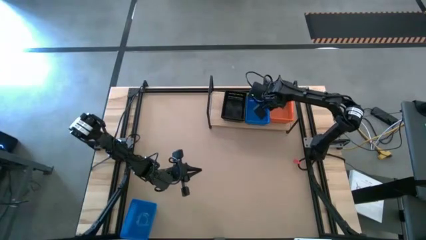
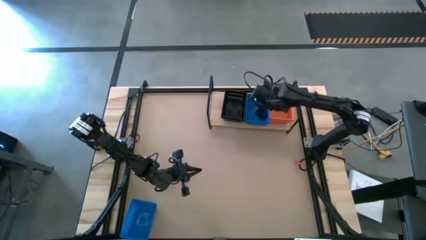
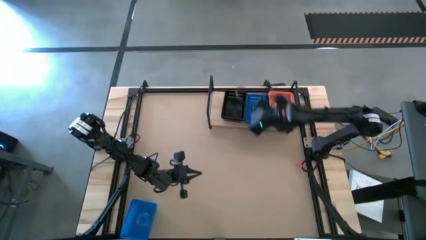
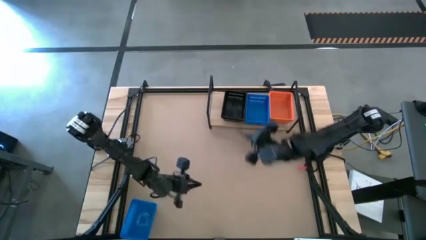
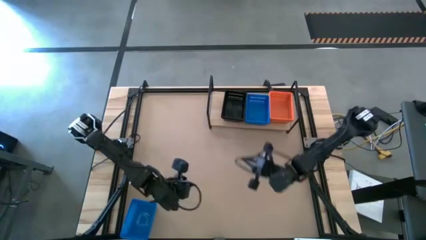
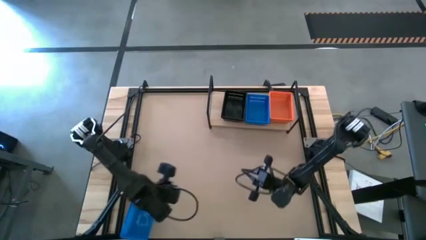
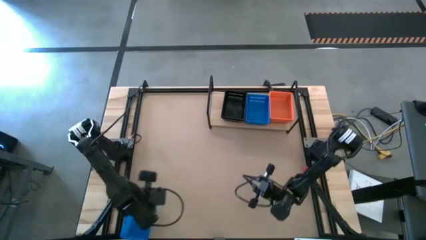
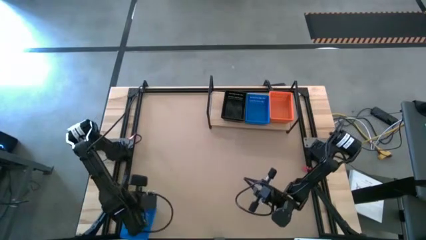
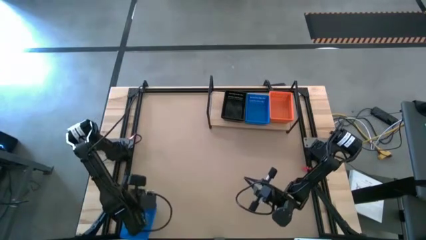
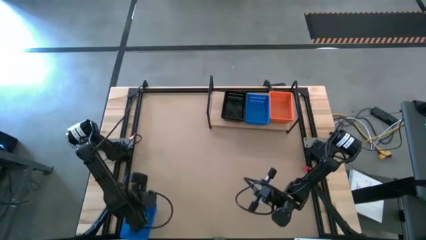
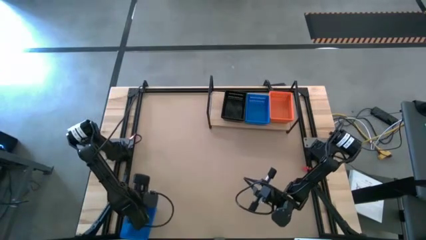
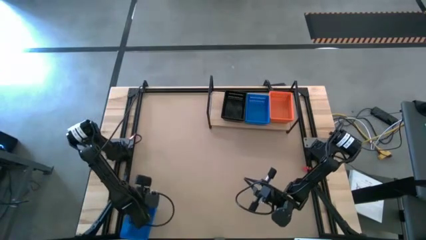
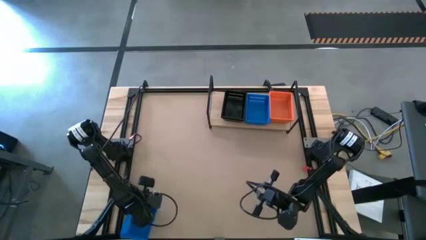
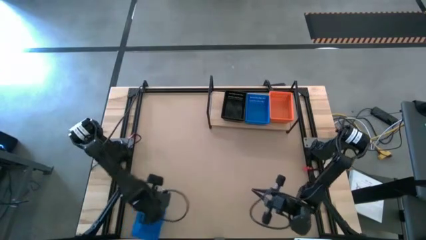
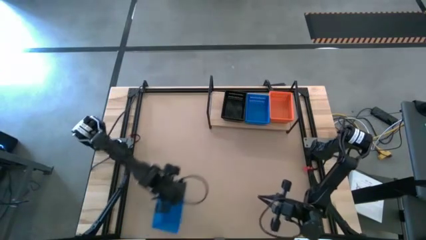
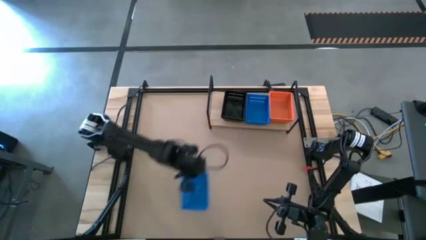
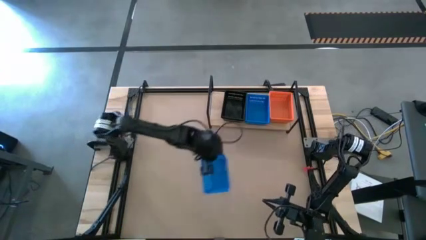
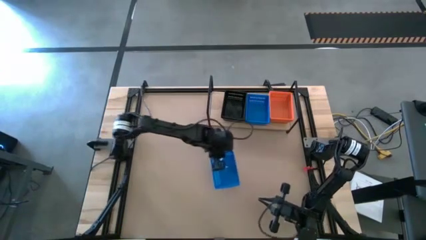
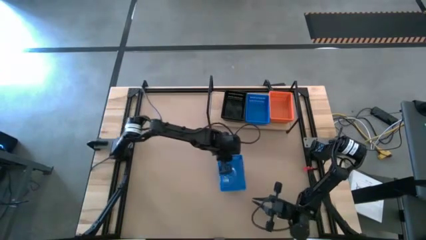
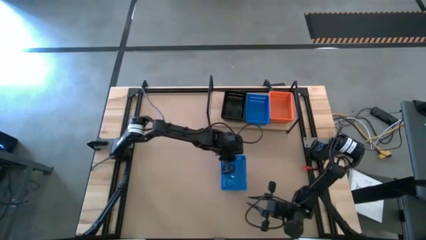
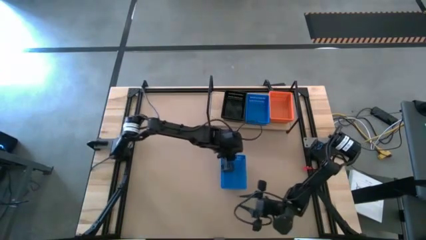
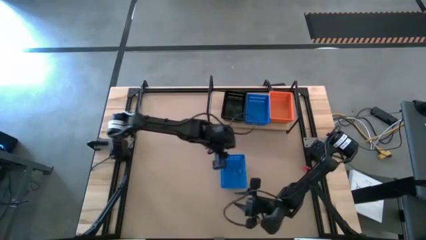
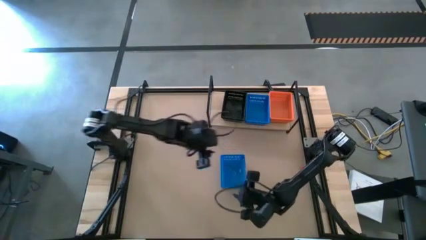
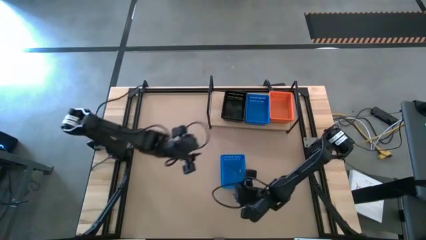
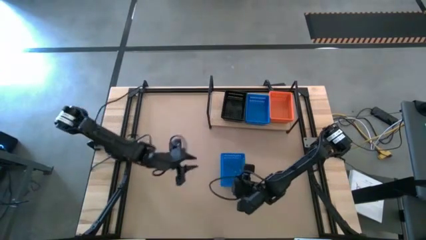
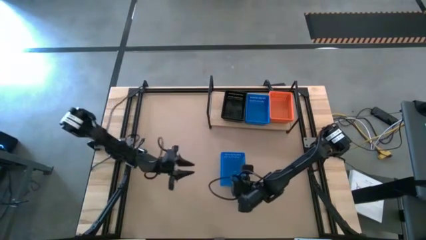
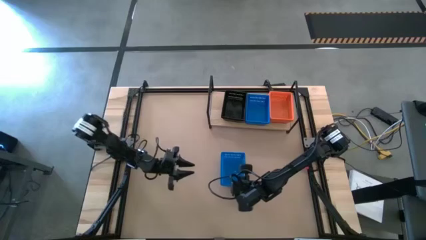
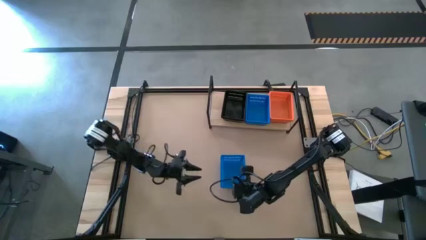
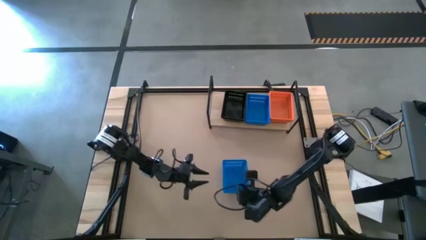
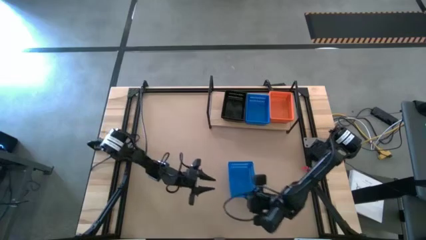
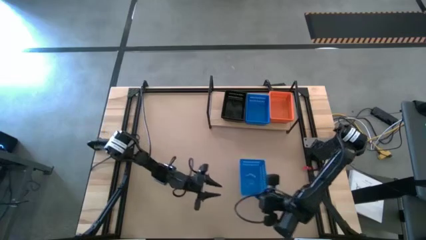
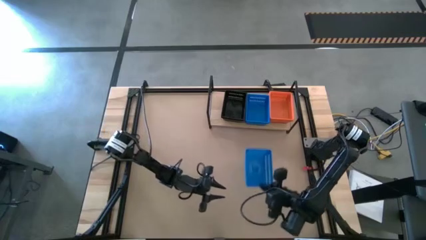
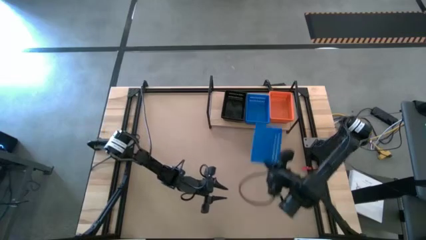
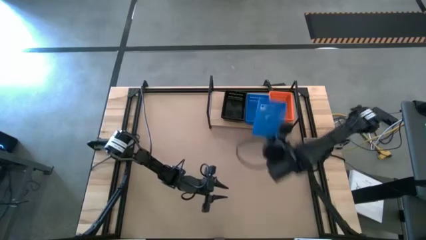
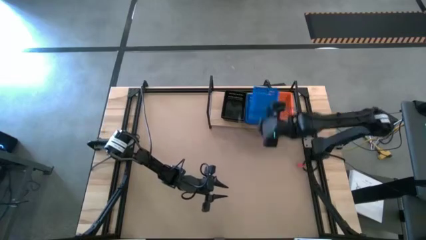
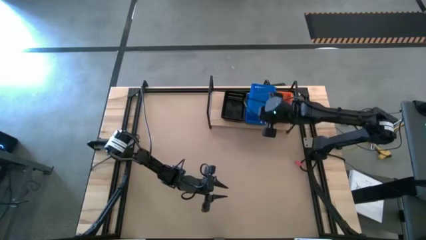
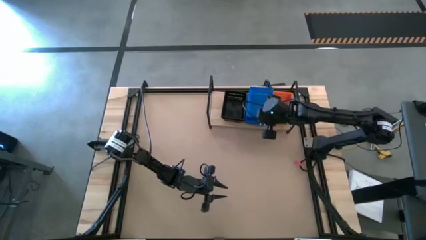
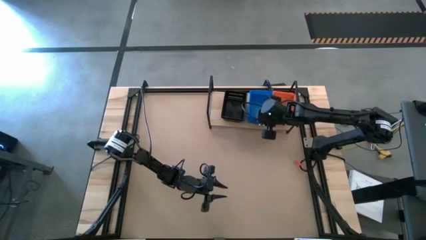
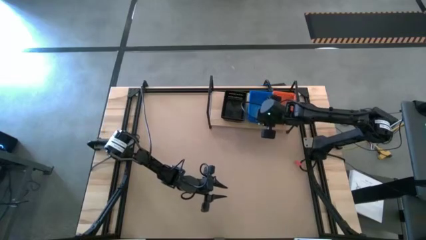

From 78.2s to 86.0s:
Task: Stack baskets on shelf by color
Put the blue basket on top of the blue baskets on the shelf

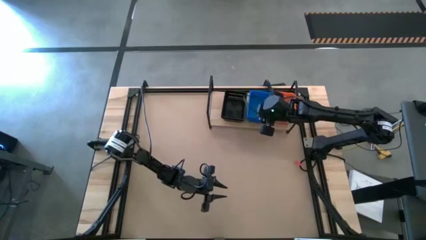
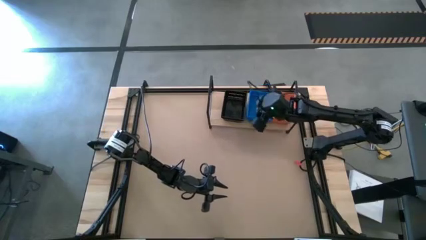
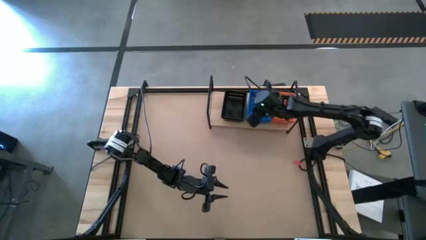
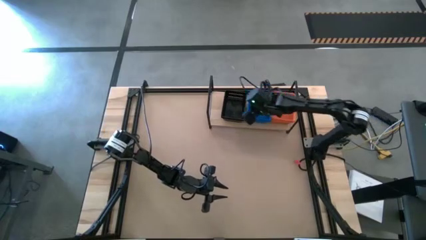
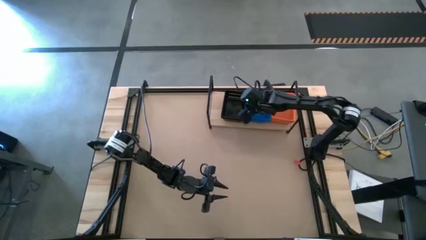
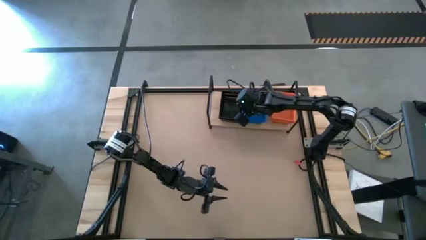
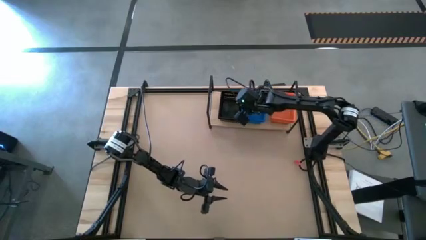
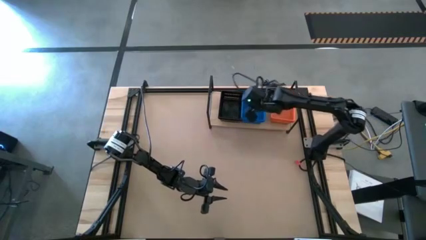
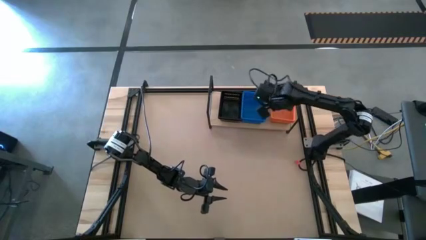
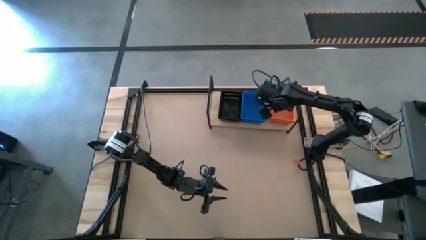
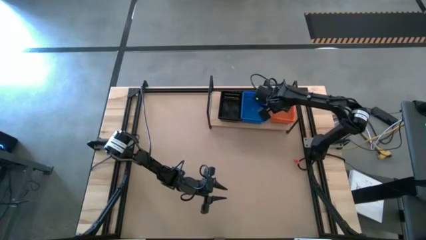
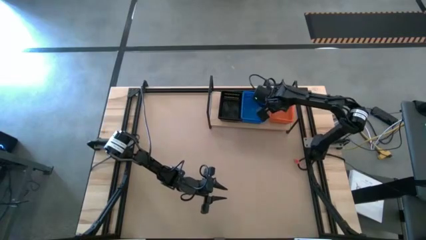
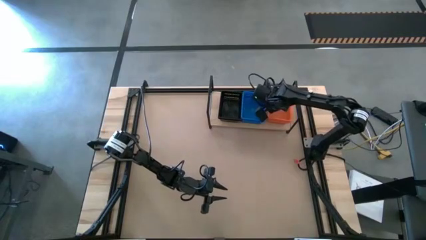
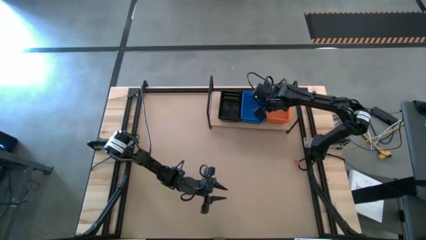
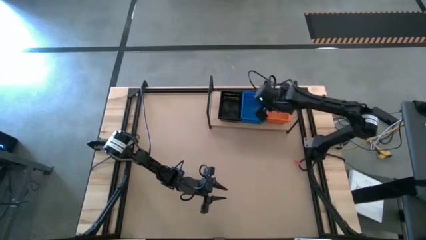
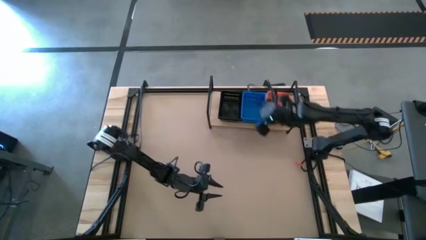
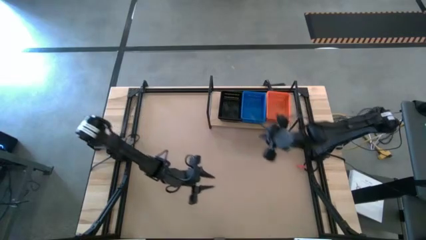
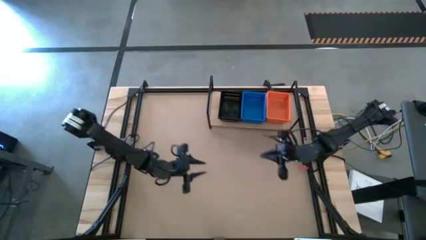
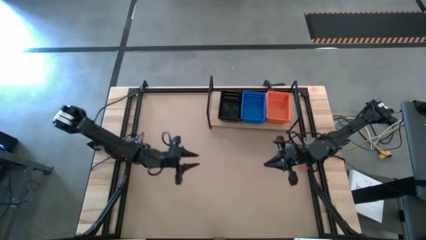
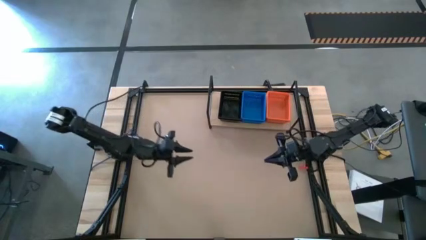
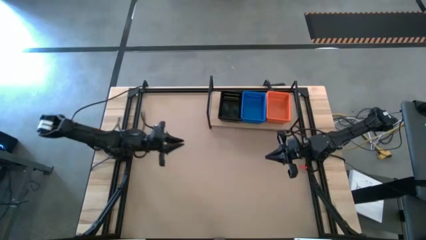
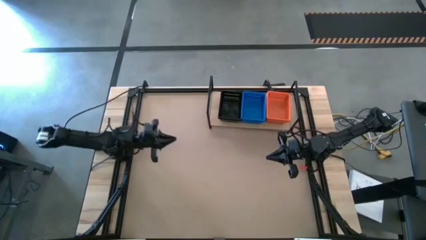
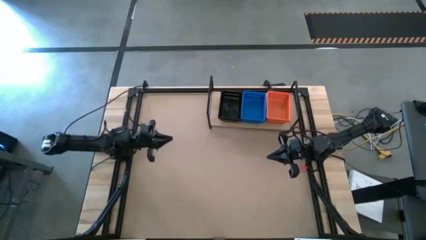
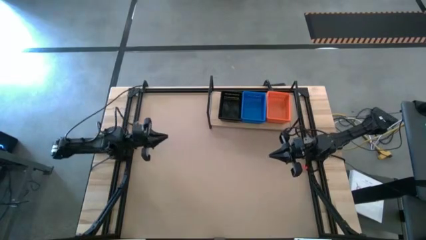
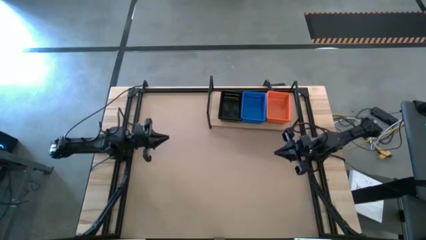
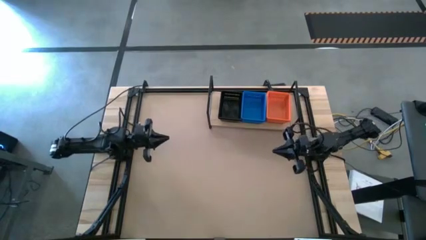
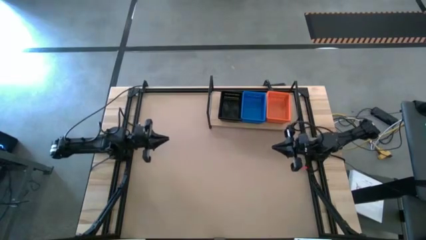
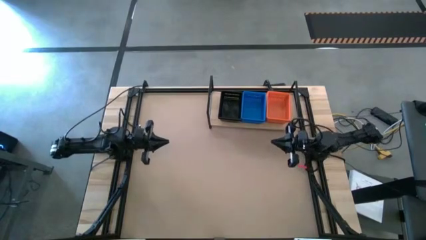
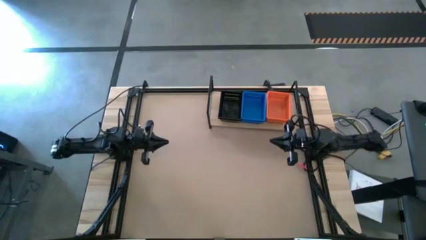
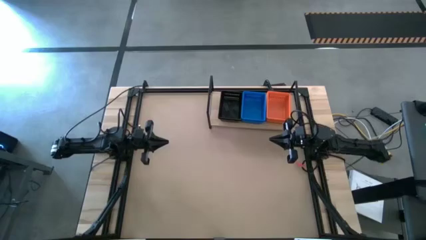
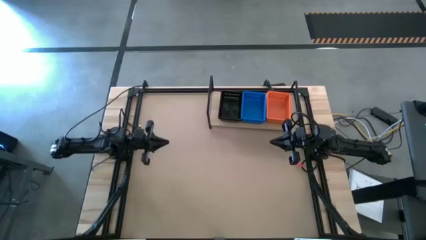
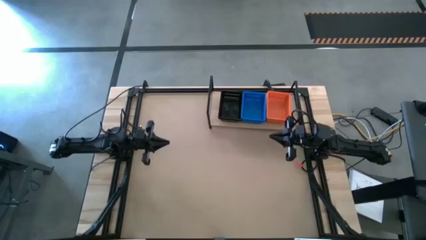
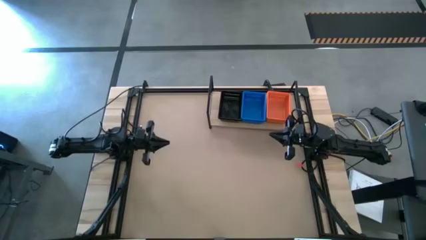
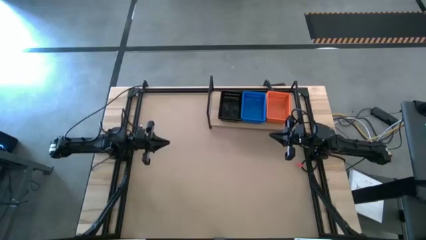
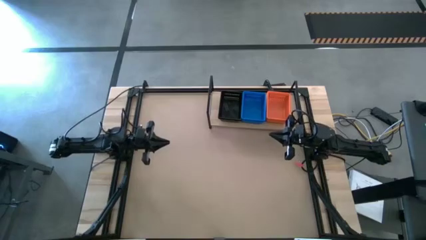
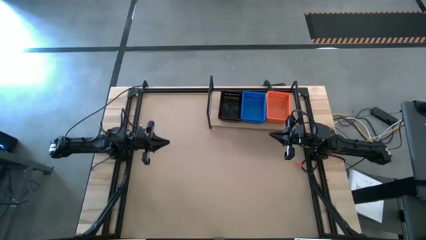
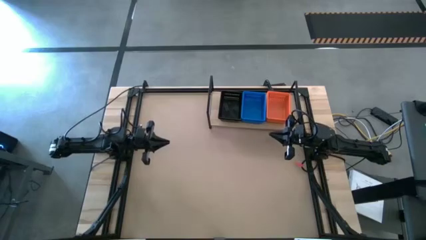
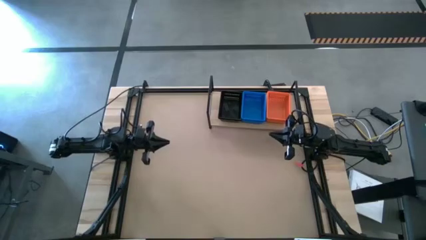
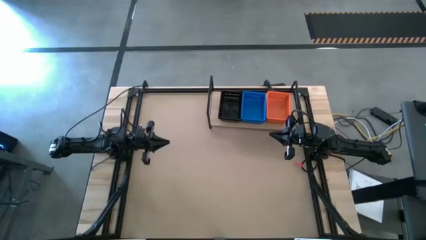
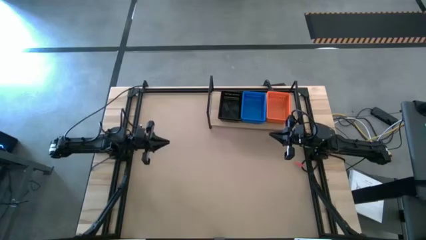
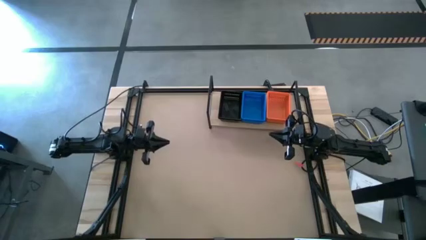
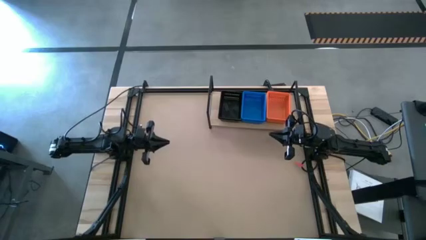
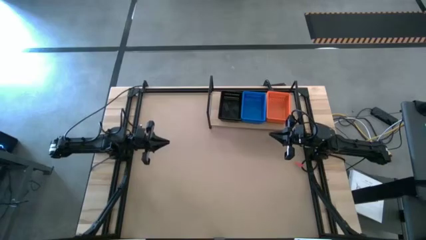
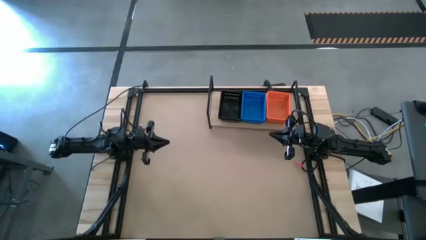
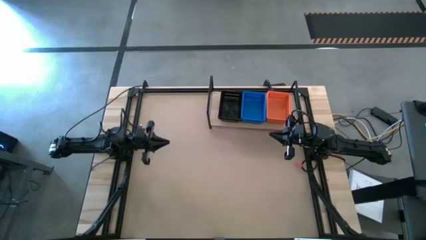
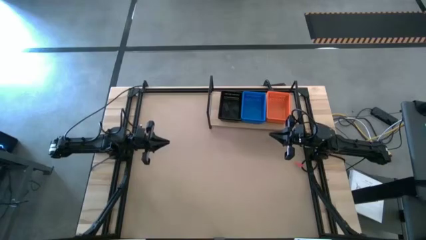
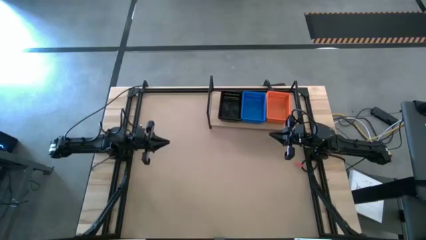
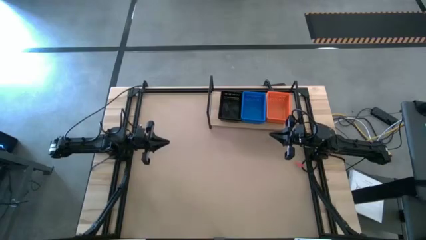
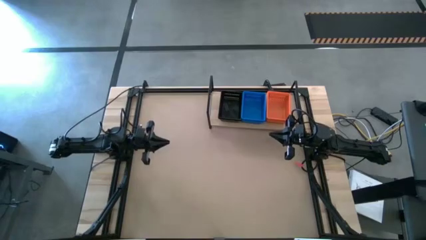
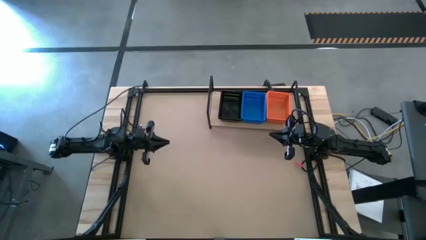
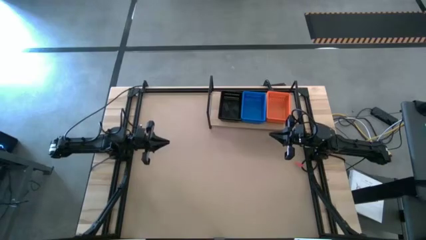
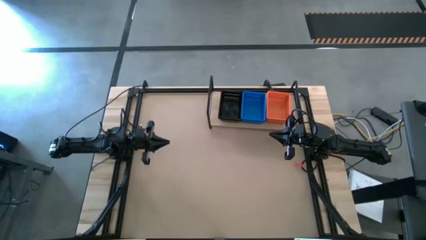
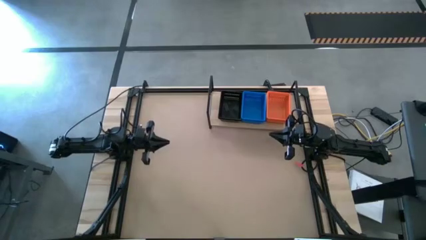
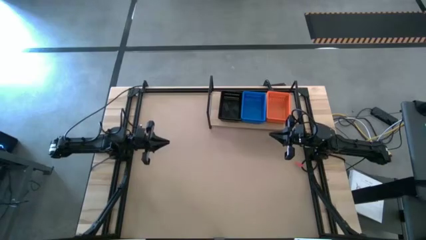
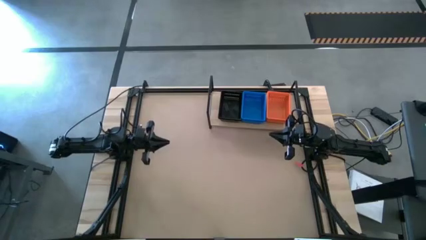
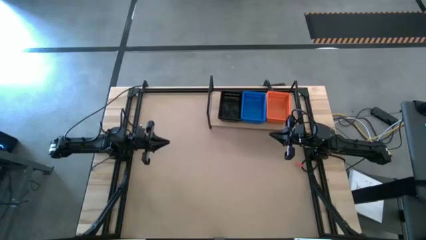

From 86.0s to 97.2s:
Return to Home Position
